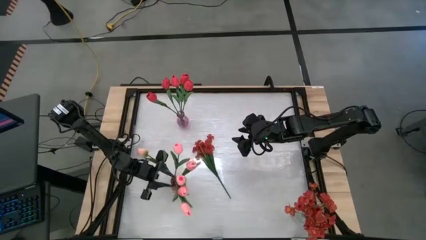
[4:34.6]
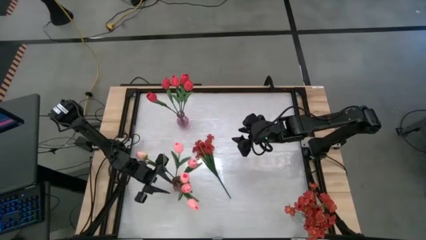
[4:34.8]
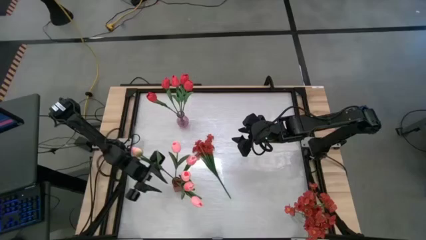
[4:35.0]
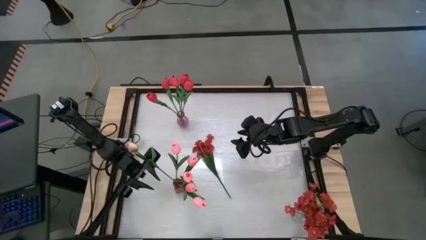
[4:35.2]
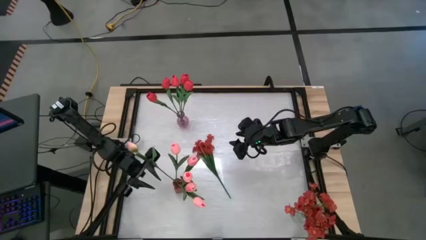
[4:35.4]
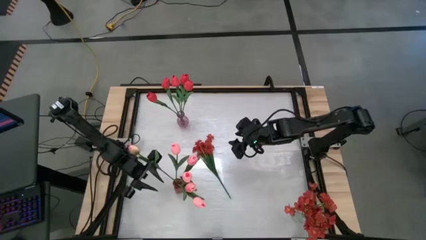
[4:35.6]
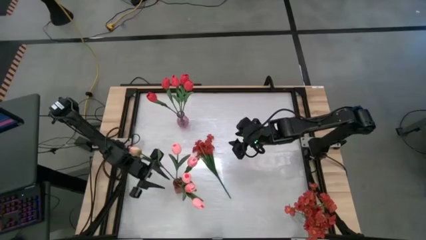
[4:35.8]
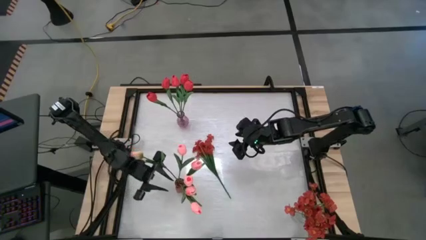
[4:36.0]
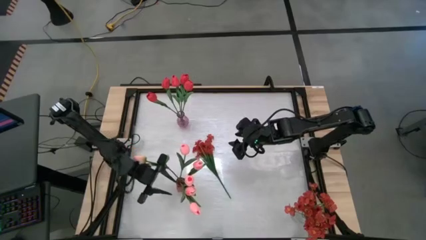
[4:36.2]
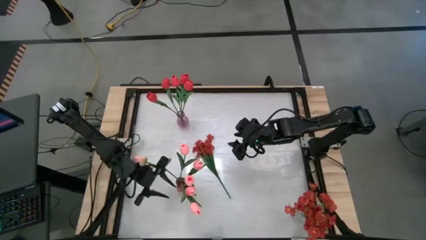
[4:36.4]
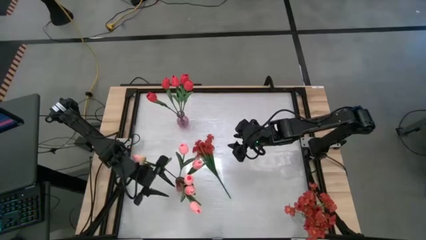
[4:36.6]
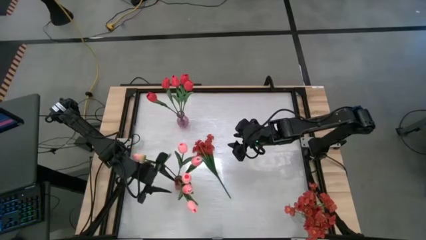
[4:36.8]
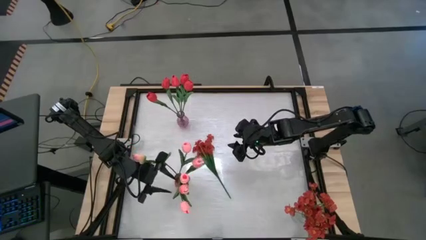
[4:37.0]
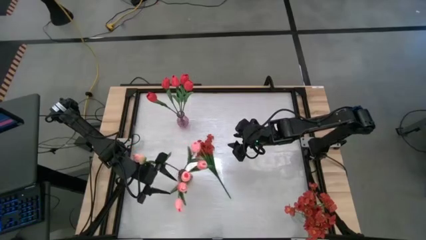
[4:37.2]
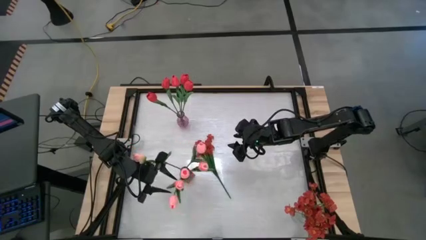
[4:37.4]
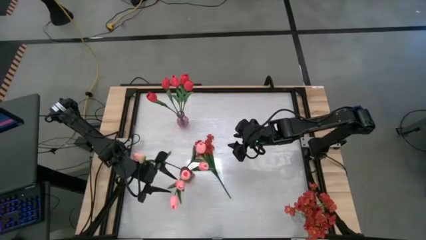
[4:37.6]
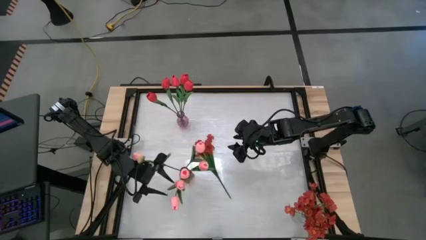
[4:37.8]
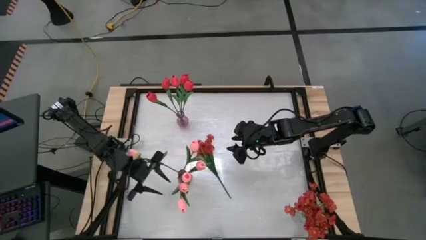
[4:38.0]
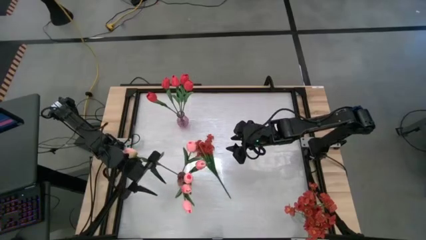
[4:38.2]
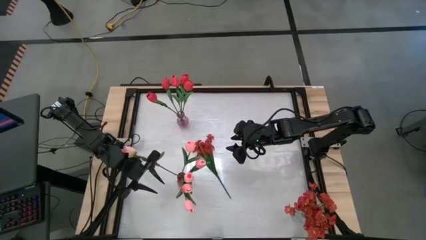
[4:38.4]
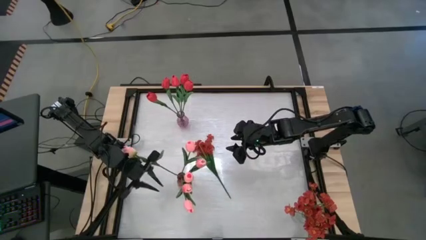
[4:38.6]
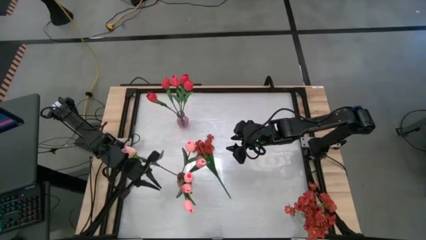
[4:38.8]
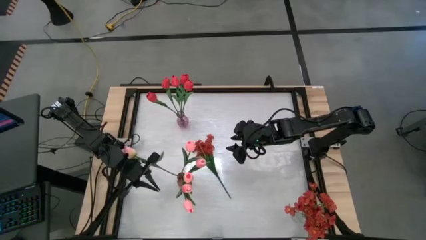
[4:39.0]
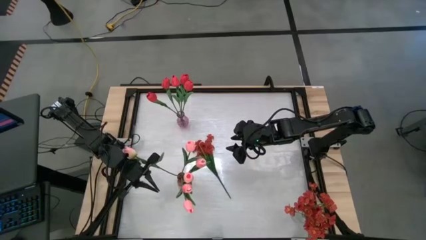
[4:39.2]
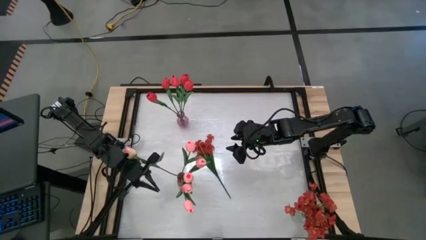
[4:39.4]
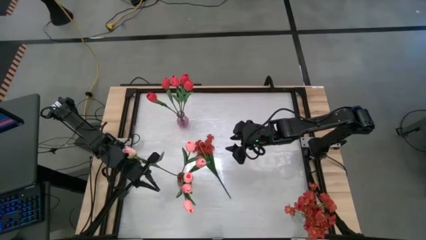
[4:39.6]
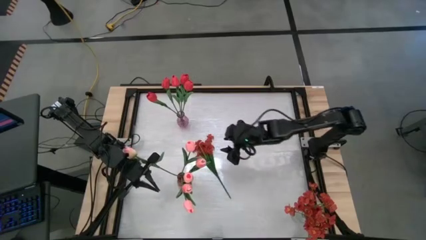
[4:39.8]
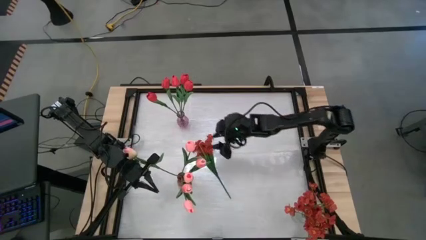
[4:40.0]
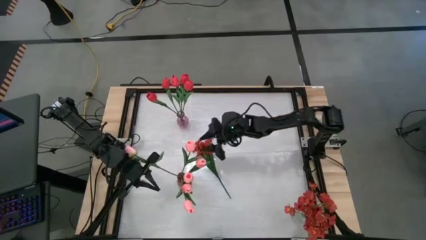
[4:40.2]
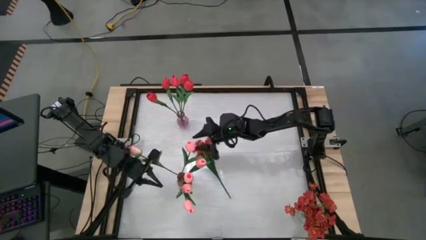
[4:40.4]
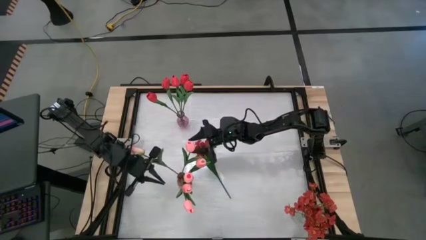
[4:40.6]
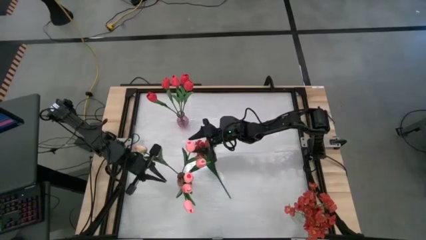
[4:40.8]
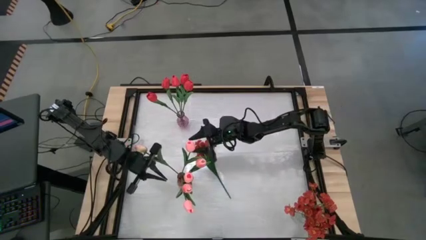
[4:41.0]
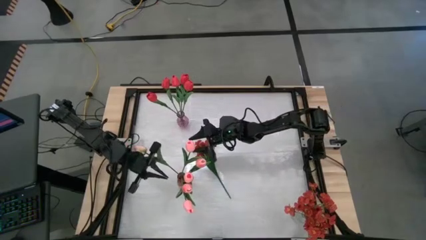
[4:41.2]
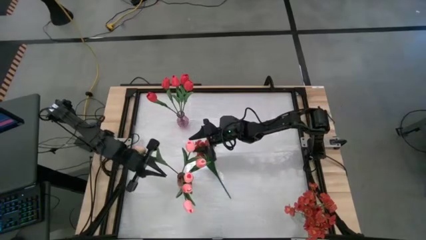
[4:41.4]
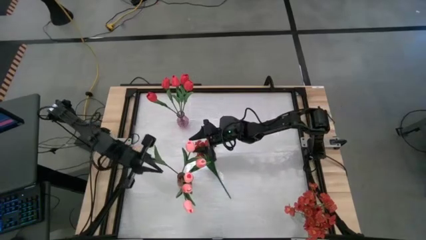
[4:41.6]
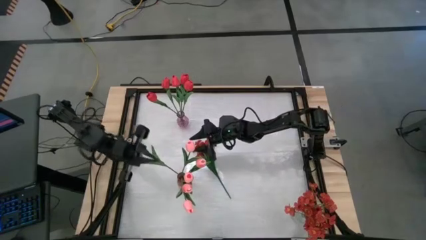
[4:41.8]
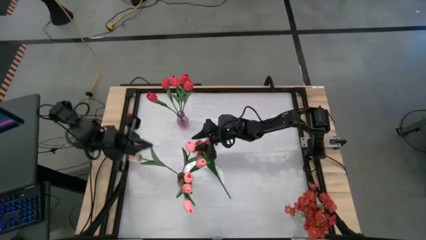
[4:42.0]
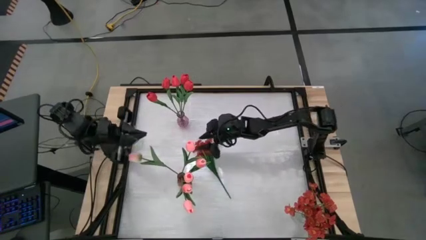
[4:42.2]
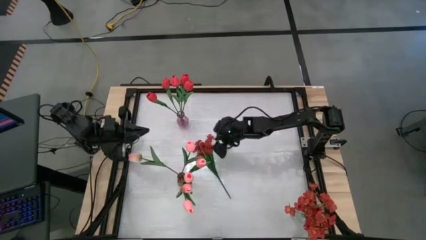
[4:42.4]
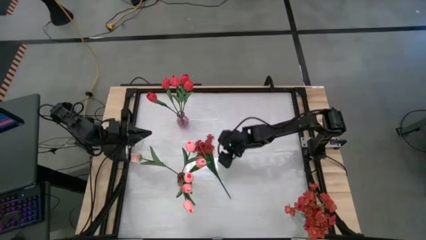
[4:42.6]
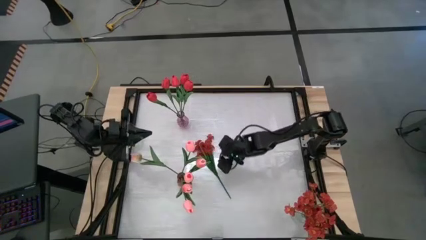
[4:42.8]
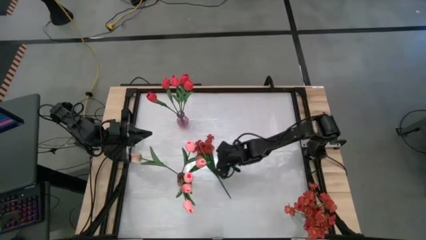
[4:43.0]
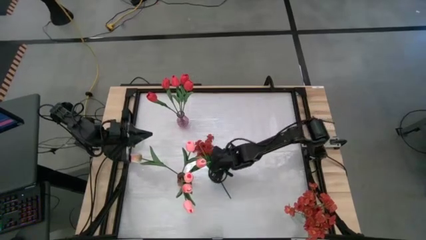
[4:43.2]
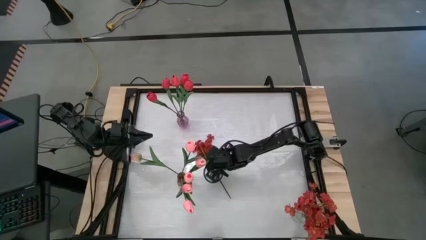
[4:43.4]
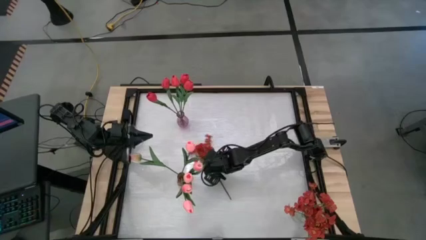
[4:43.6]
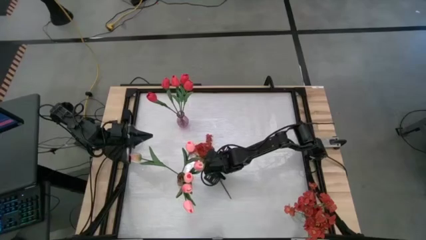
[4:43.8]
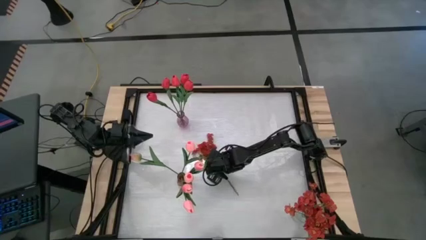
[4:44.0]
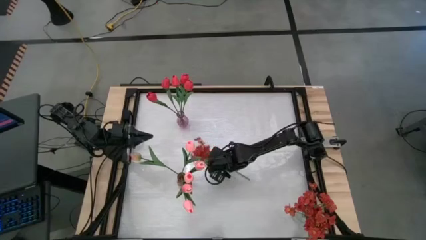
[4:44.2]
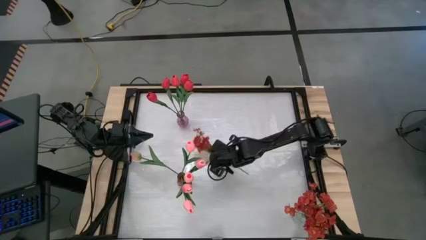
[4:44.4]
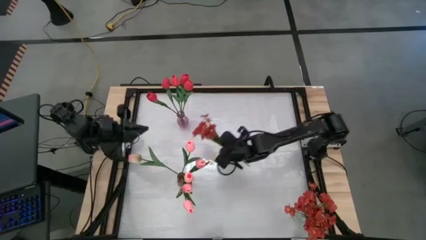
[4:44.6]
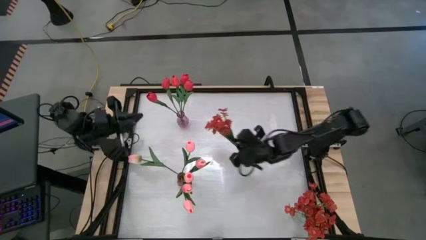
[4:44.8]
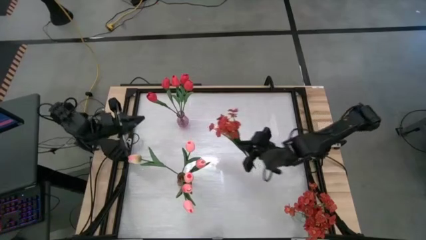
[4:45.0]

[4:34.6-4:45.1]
Task: Sort flowers into vase by color
Put the red flowers into the transparent vase

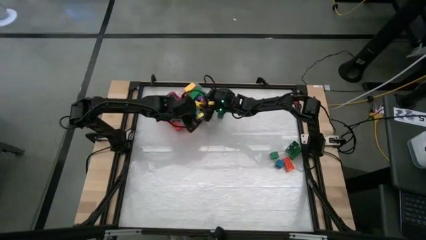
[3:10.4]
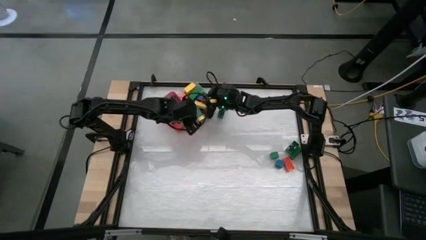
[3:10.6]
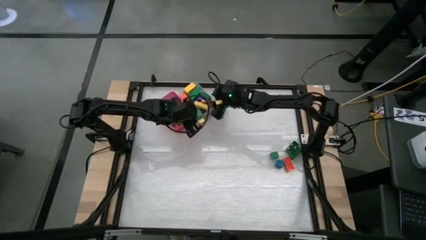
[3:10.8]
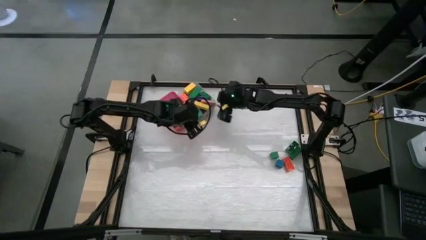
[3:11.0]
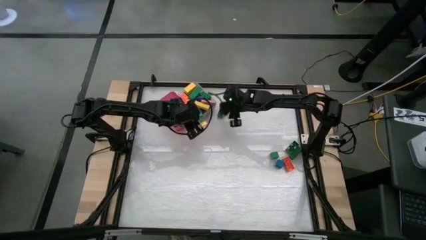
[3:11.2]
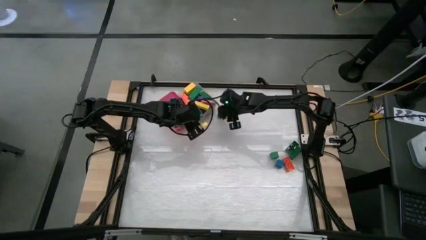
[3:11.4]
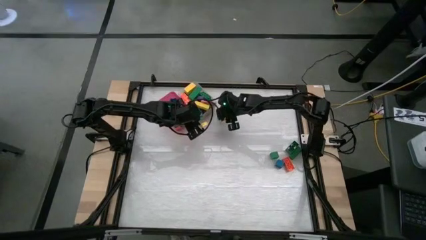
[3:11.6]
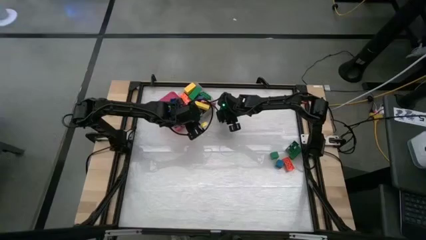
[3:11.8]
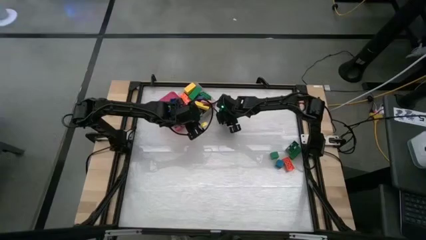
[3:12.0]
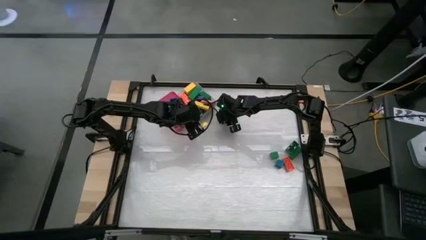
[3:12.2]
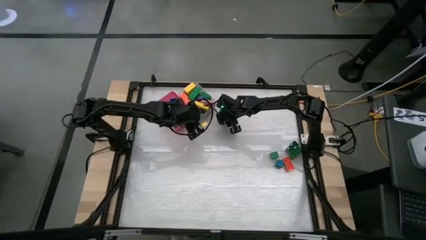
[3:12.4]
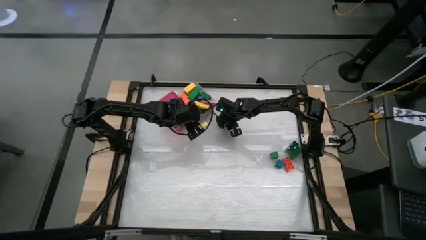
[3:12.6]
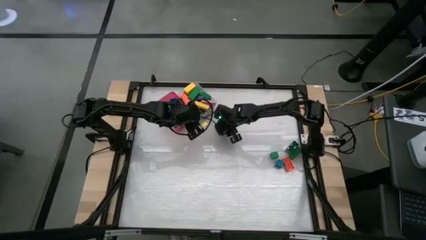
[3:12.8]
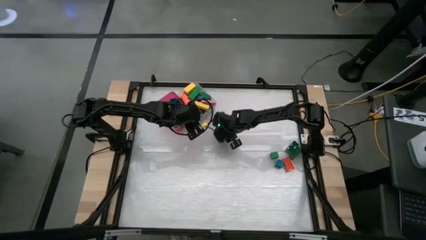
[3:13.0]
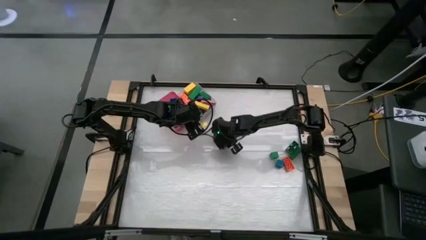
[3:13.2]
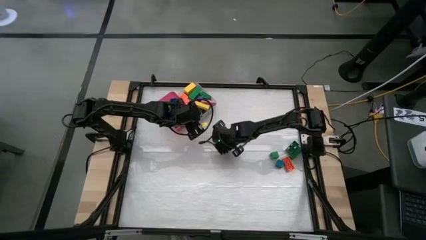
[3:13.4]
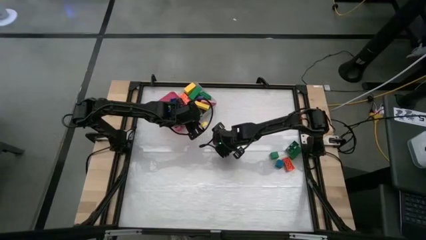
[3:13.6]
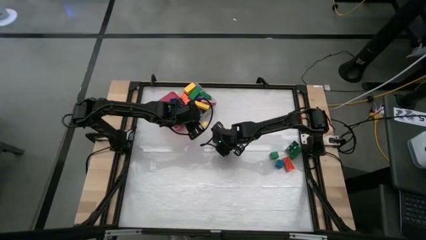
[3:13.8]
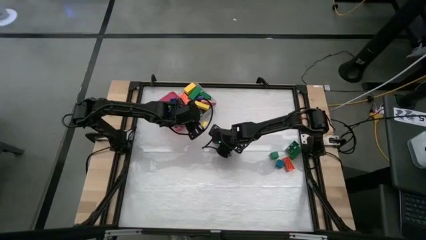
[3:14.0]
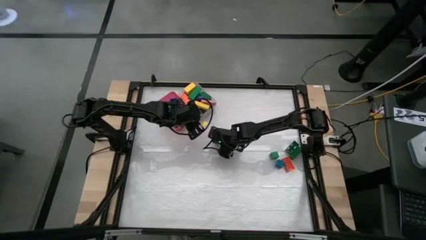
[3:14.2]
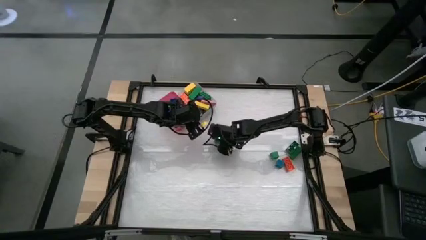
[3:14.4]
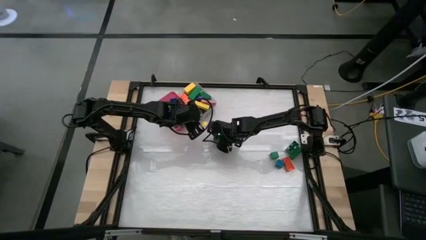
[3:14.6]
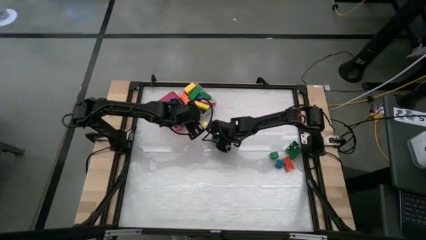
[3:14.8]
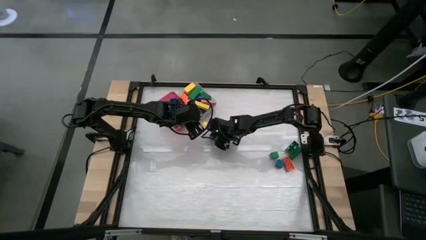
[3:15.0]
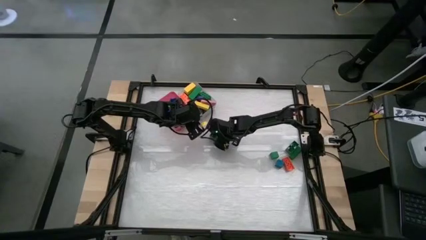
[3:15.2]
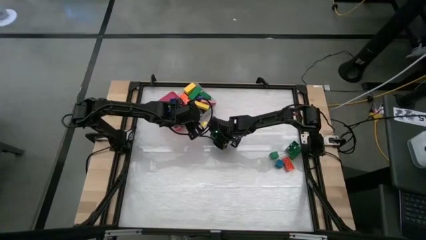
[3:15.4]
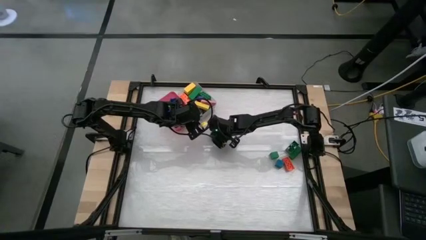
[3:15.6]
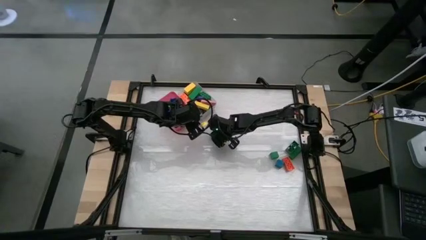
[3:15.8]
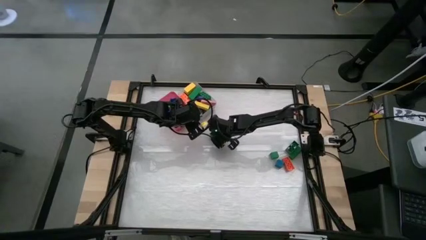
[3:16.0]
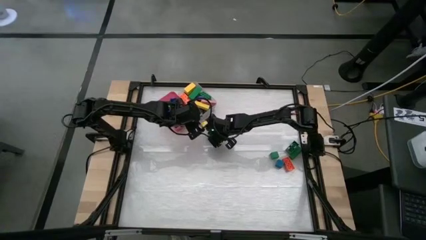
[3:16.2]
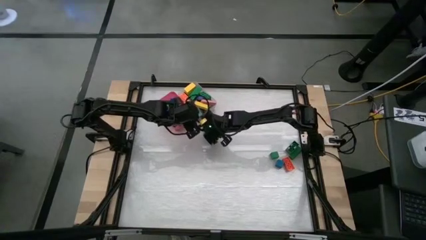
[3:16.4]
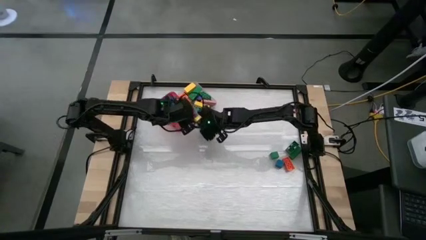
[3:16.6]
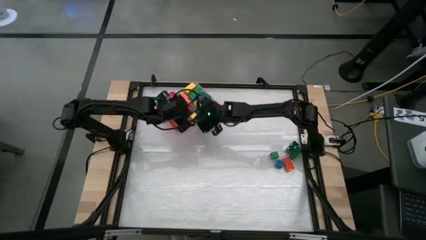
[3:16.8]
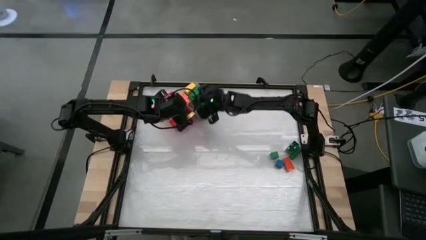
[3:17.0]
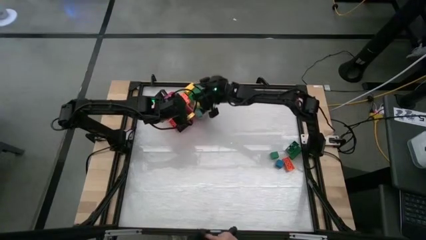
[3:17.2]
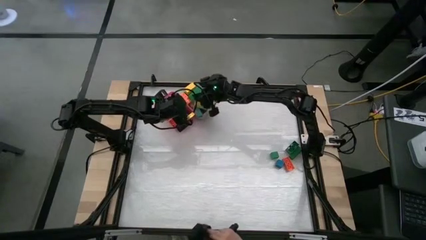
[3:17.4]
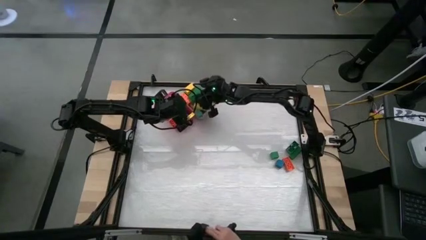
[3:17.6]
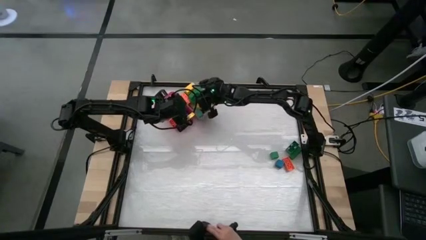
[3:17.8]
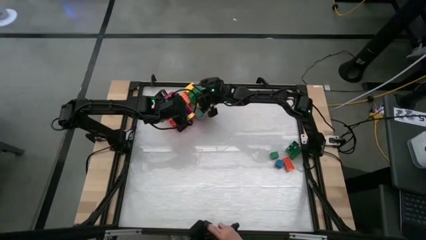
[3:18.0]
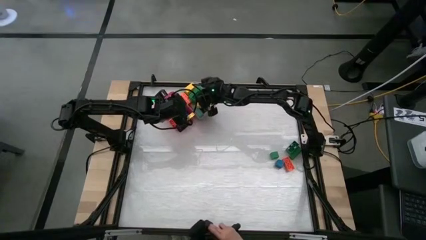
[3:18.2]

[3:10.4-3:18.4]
Task: Sort blocks by size
Put the big green game piece into the white bin
